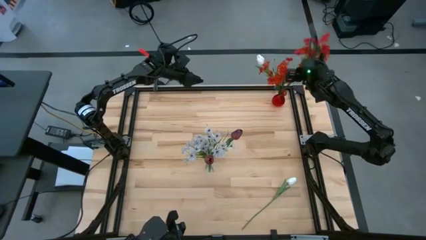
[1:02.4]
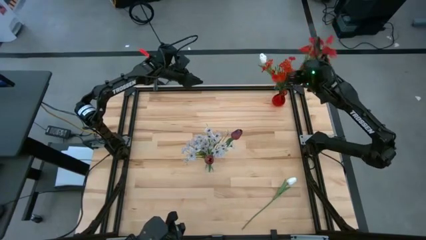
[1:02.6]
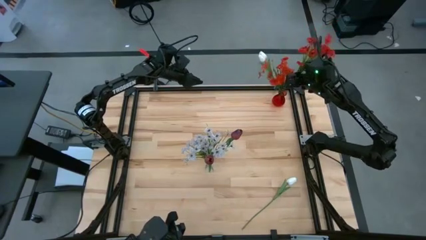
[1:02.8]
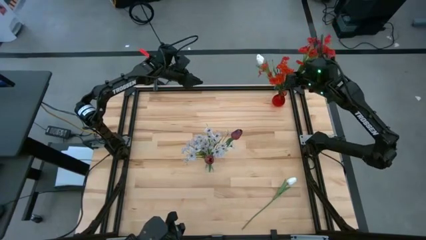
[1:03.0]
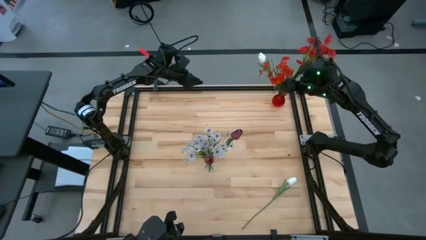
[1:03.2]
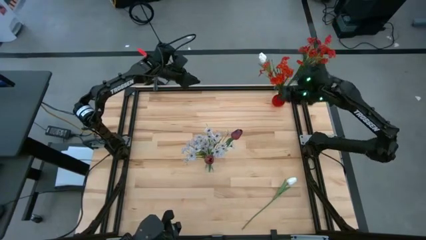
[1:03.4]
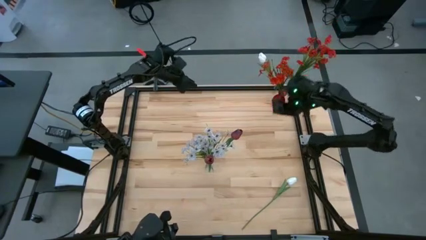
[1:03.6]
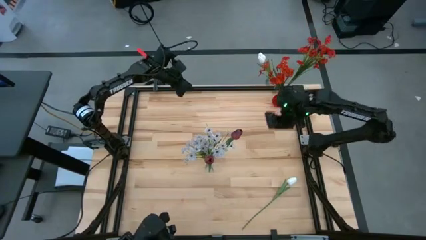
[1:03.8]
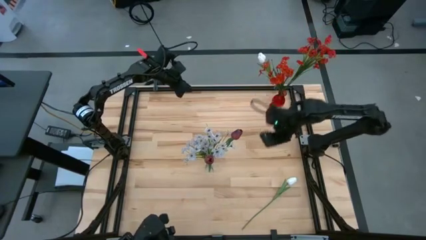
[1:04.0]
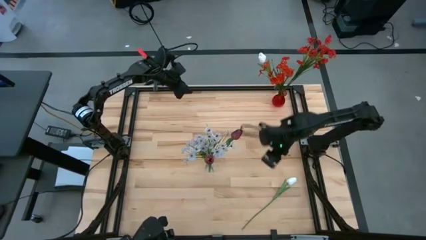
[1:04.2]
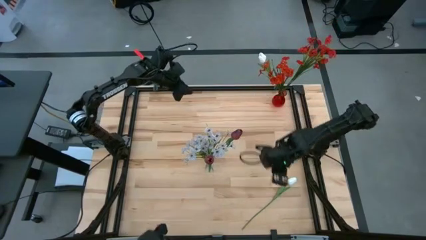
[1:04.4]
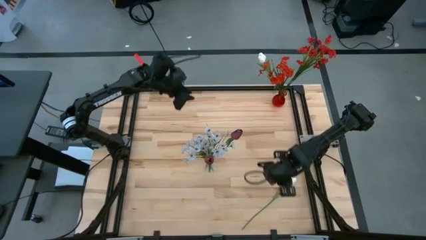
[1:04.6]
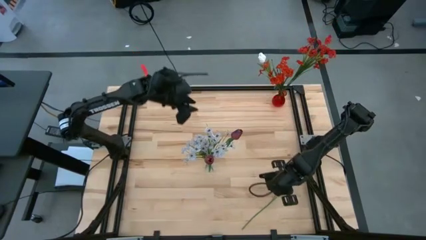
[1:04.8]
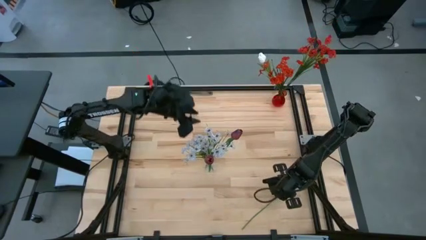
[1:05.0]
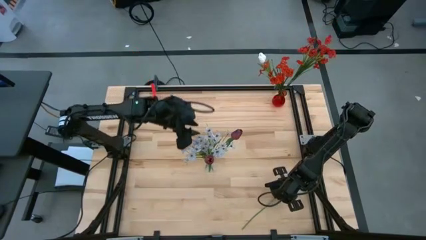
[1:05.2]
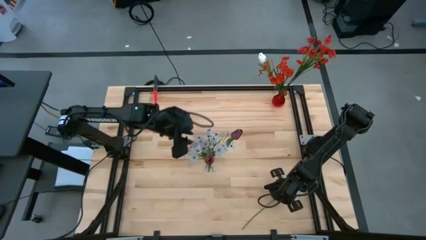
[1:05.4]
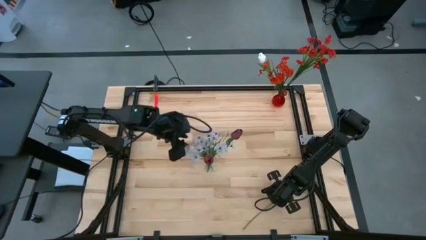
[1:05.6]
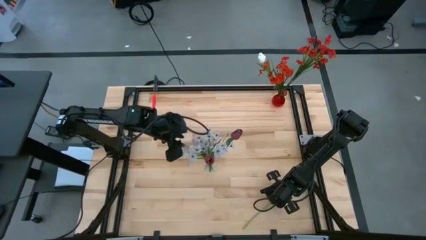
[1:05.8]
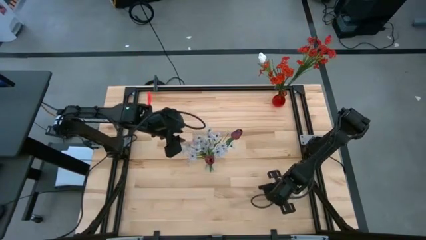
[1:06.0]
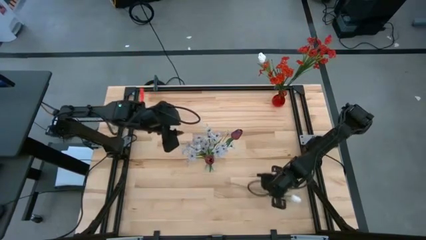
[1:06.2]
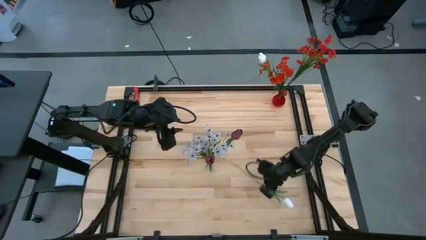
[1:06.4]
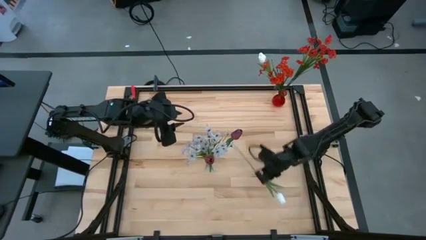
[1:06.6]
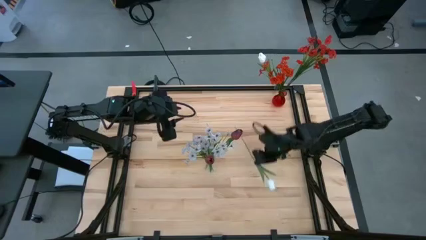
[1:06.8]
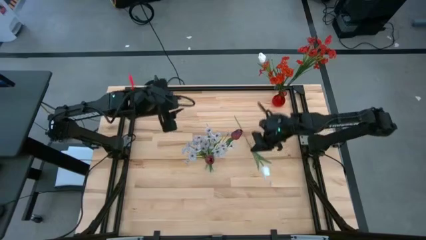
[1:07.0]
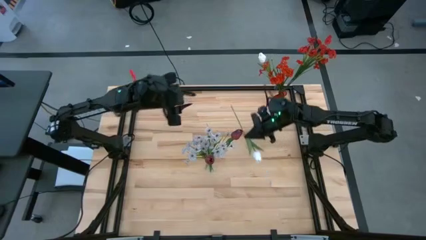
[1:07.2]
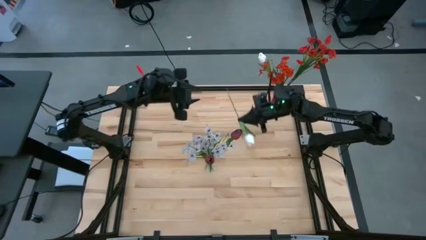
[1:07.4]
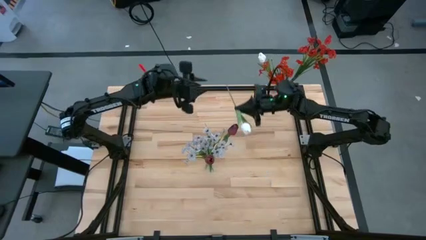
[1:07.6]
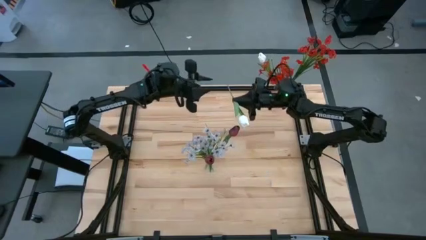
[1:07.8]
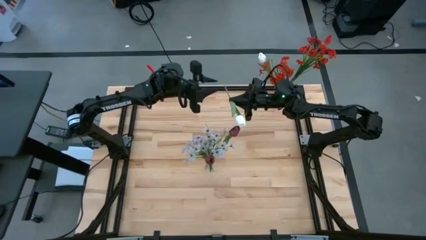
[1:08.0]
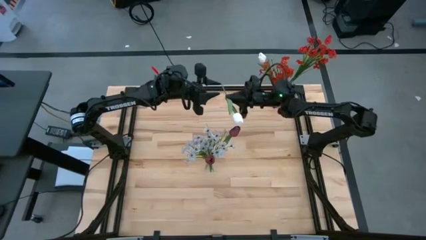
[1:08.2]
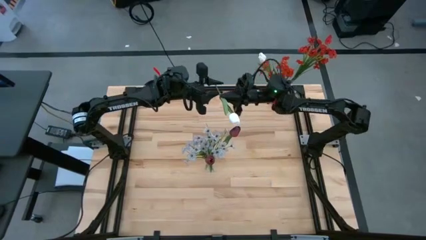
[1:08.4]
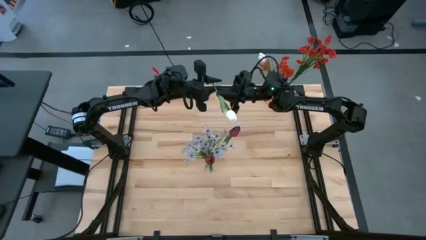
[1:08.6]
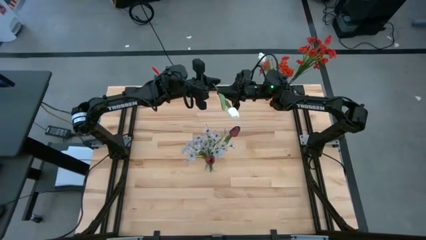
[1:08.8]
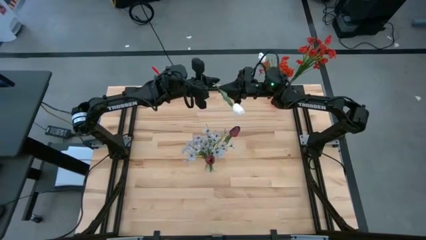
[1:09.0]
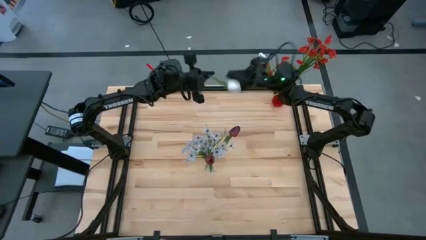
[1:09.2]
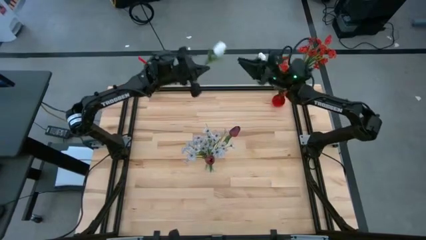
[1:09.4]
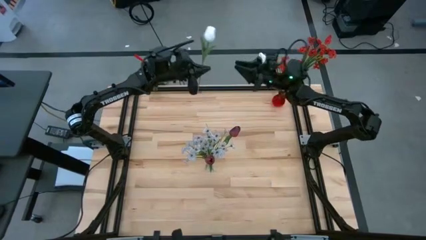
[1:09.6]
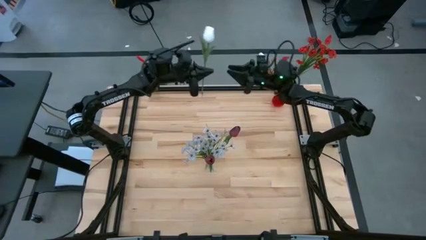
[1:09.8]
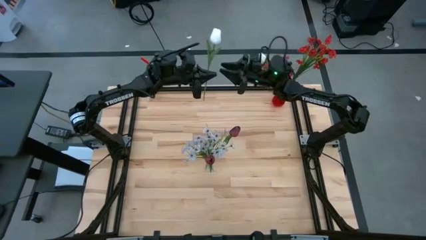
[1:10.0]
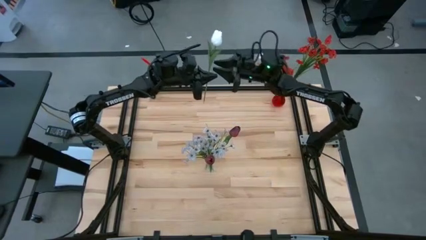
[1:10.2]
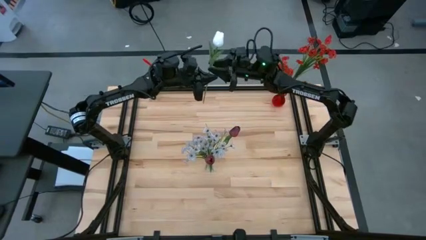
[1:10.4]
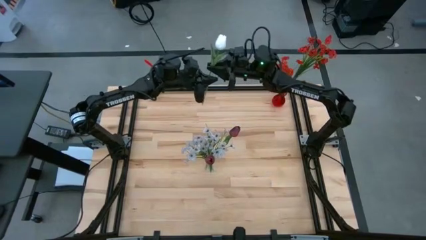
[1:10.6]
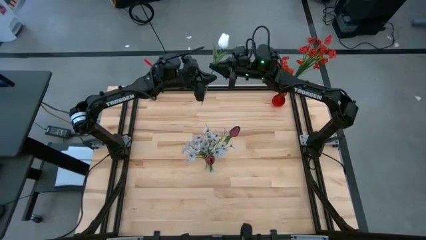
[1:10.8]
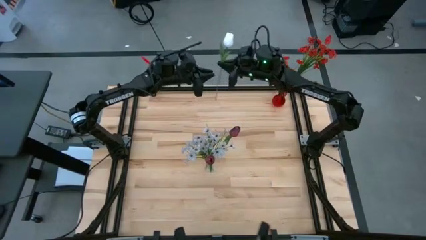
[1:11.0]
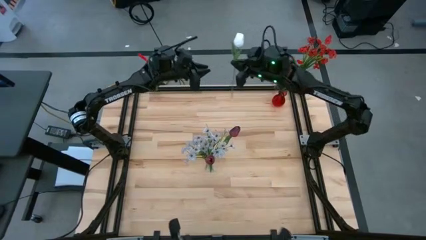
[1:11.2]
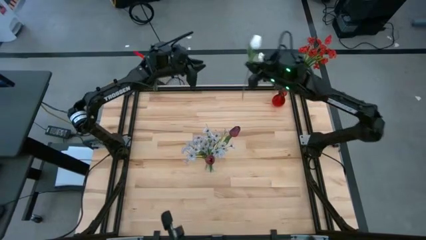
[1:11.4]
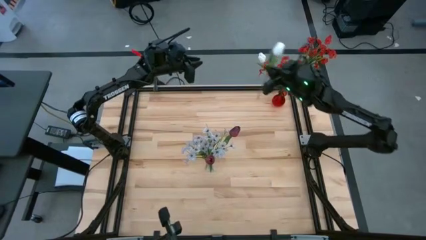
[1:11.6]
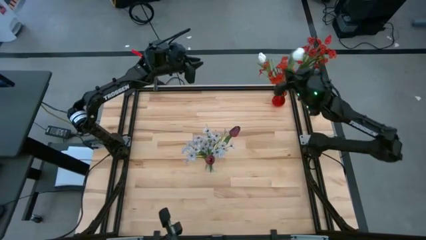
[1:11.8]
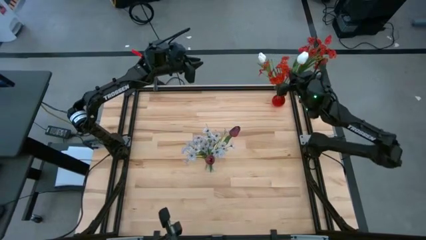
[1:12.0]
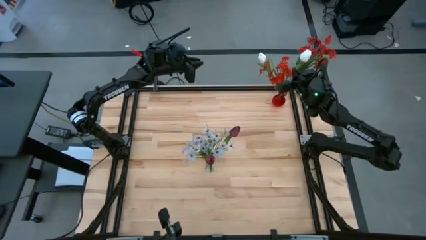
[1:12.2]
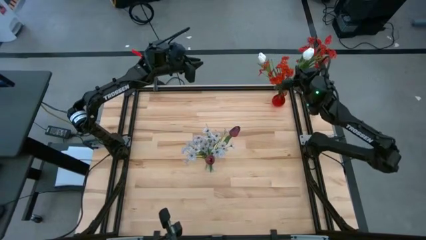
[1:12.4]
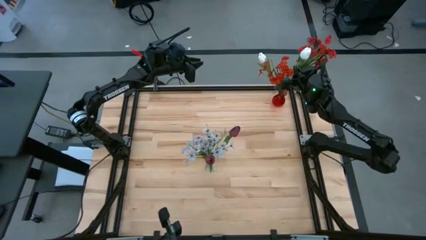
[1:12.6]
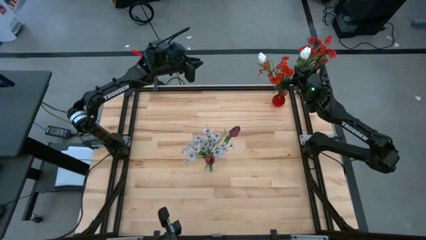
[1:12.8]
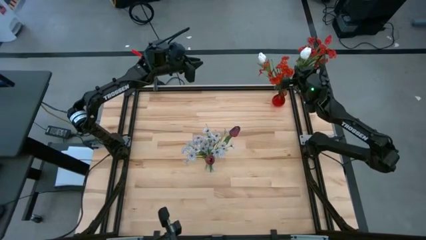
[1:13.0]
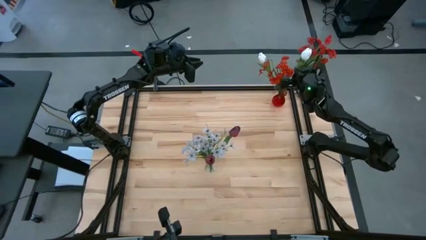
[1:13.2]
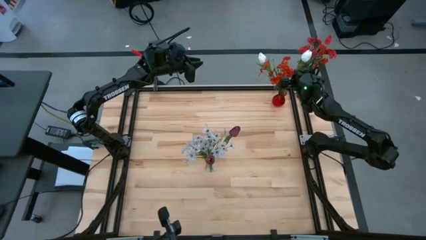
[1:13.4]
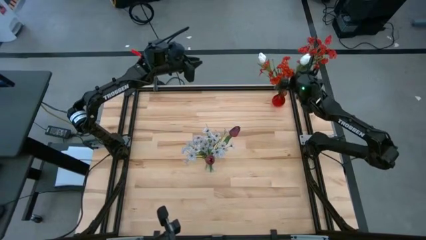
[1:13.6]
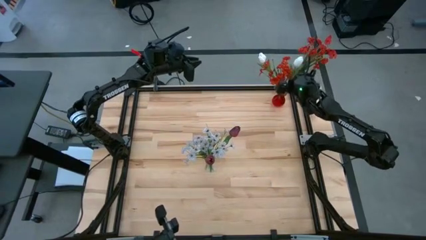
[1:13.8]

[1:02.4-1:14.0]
Task: Sort flowers into vase by color
Put the white tulip into the red vase

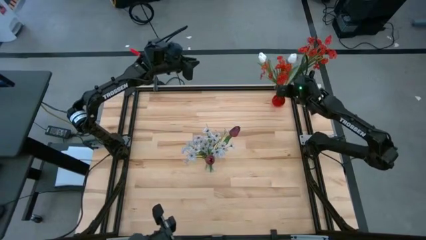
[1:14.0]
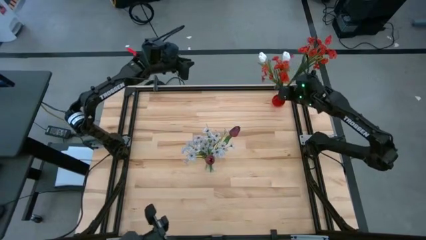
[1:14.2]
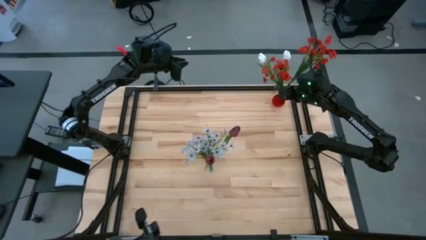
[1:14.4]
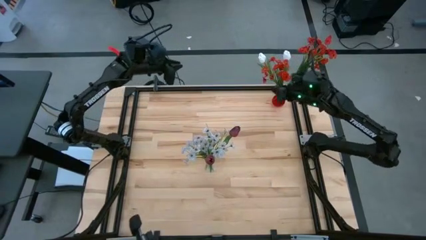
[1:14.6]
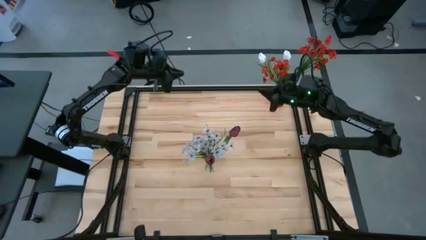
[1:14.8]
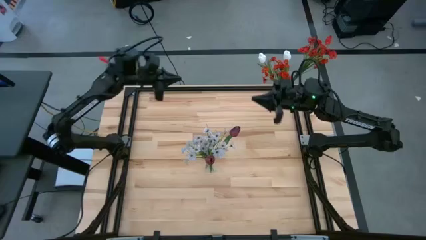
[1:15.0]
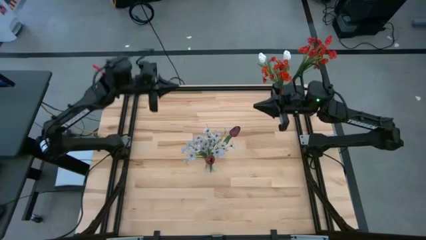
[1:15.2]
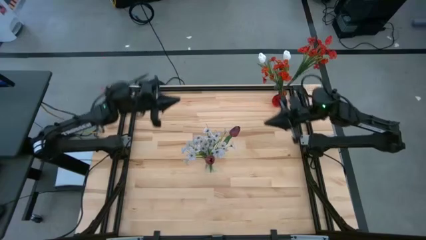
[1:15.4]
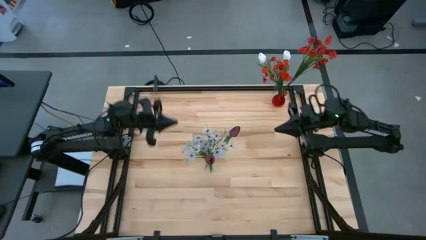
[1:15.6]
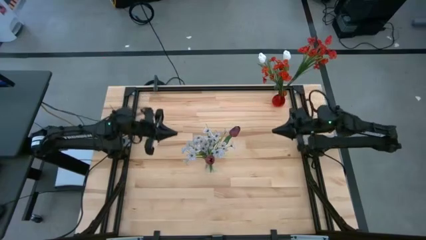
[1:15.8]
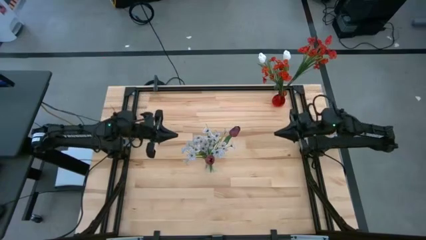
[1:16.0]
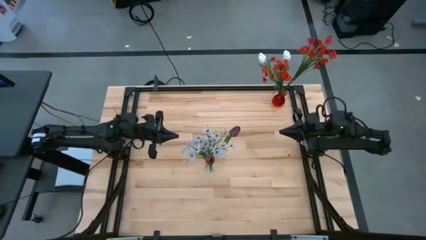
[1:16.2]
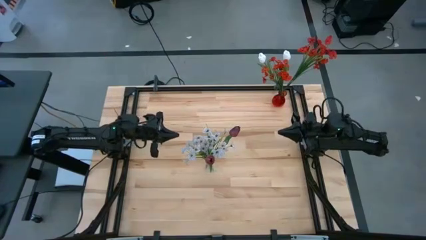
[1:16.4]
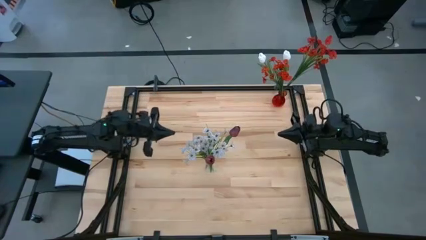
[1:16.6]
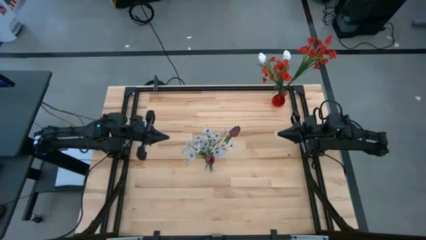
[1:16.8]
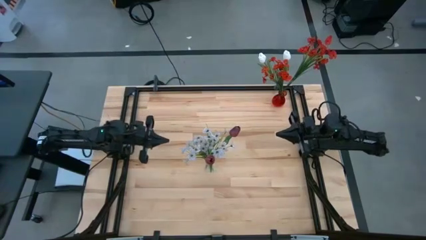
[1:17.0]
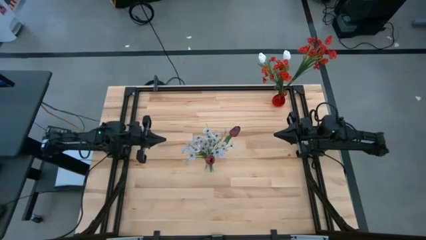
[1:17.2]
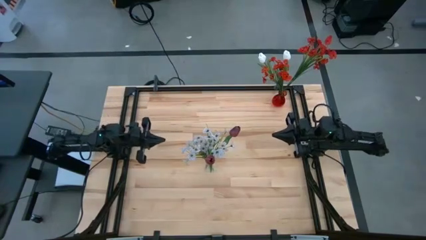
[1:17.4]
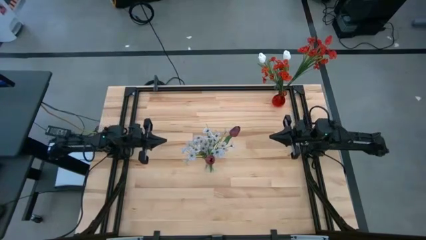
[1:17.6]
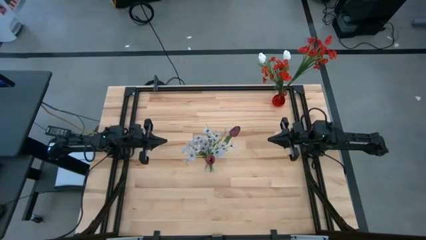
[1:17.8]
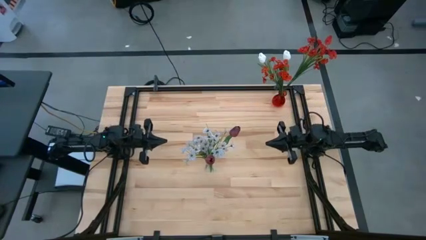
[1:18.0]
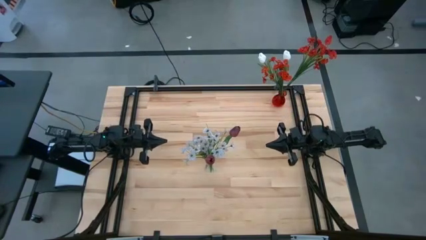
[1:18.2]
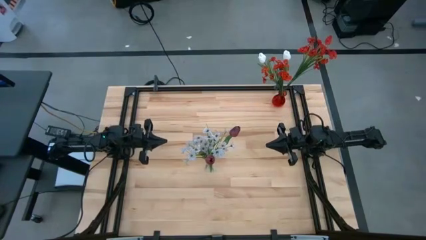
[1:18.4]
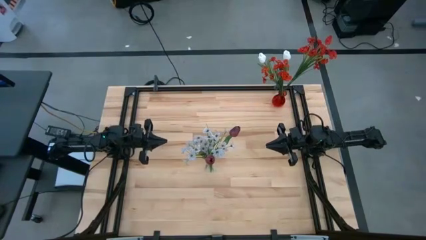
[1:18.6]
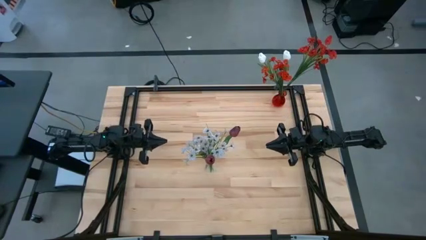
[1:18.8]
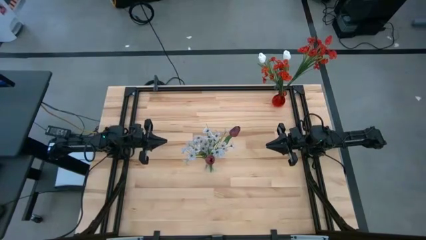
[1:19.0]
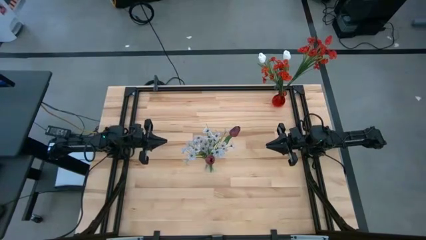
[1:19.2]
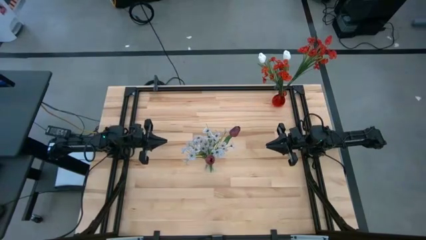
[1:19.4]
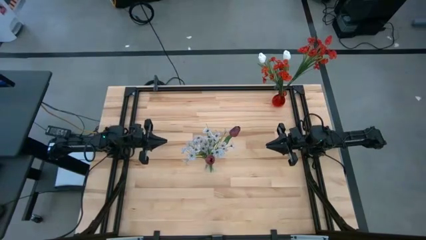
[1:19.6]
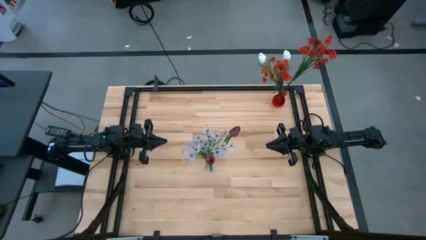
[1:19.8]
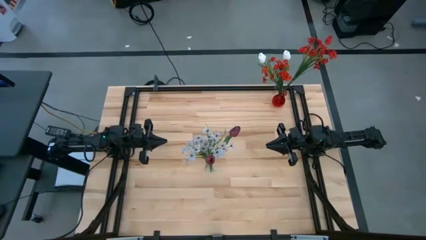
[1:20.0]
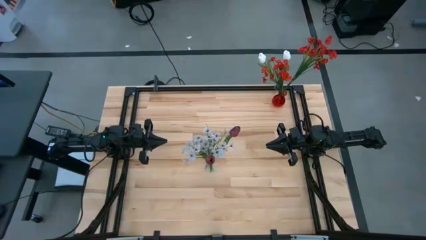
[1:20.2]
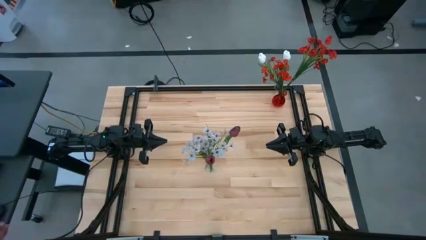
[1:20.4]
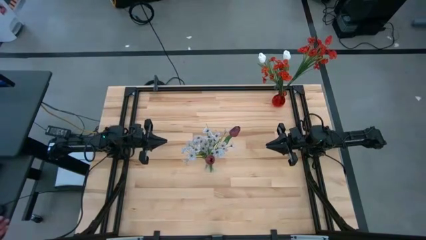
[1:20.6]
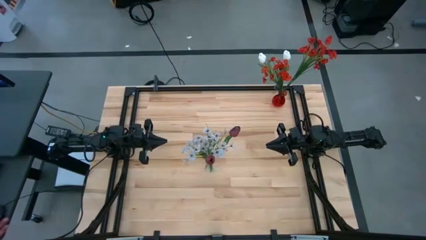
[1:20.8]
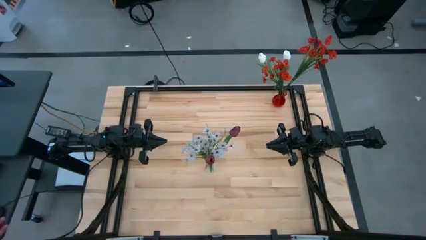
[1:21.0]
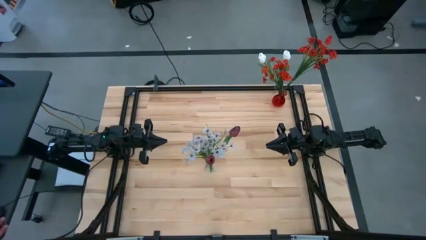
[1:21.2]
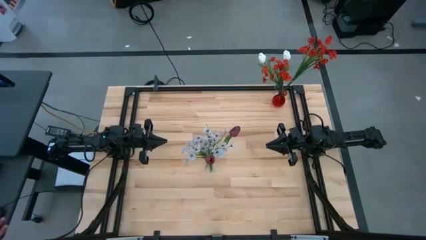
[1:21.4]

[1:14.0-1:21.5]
Return to Home Position
